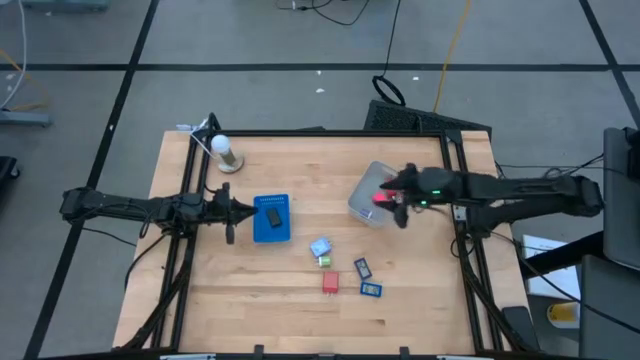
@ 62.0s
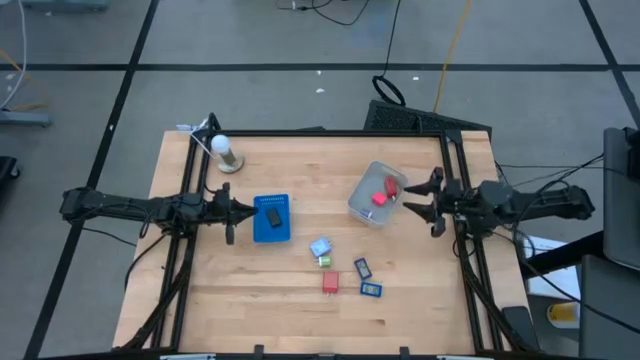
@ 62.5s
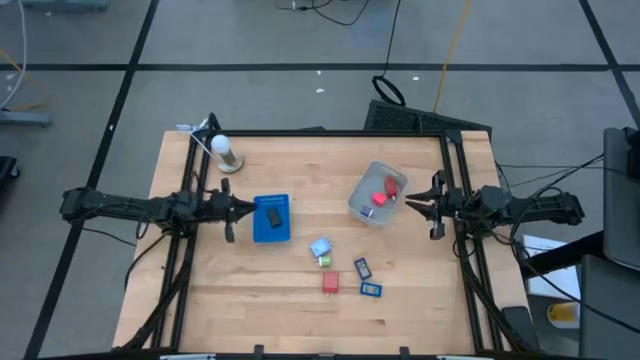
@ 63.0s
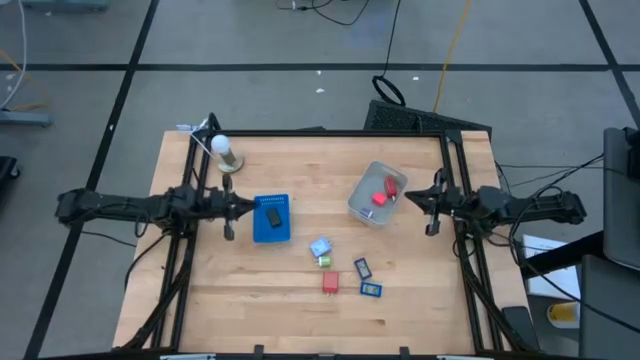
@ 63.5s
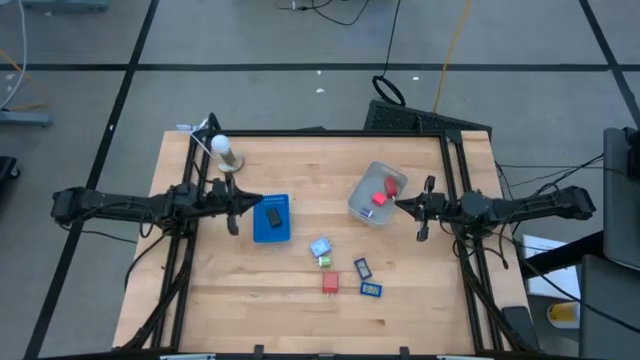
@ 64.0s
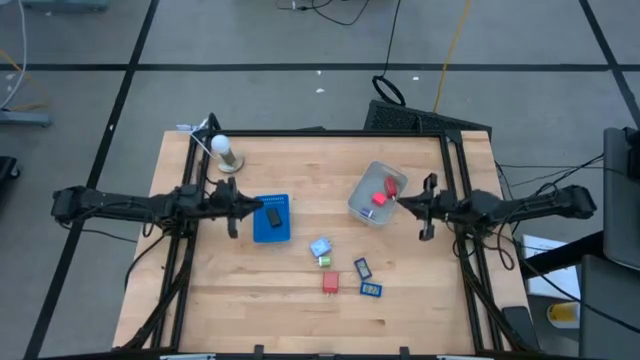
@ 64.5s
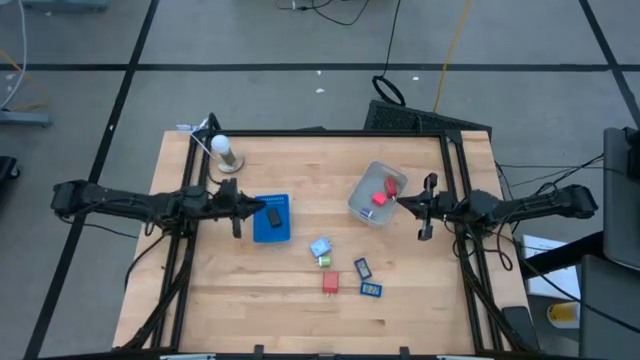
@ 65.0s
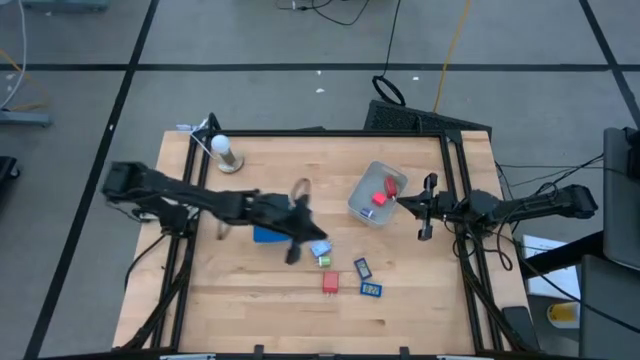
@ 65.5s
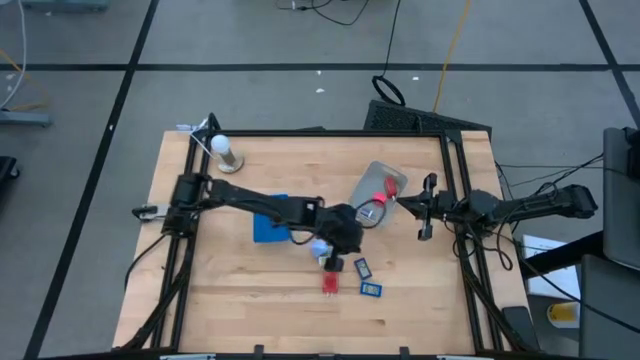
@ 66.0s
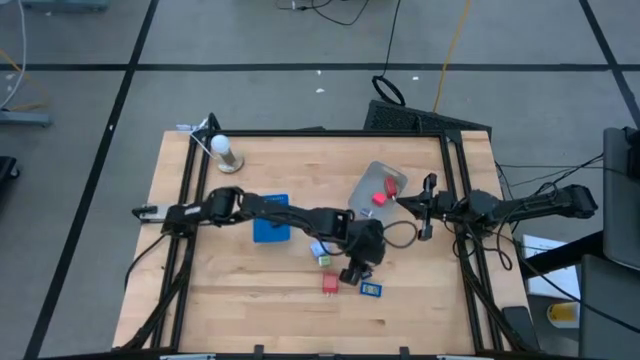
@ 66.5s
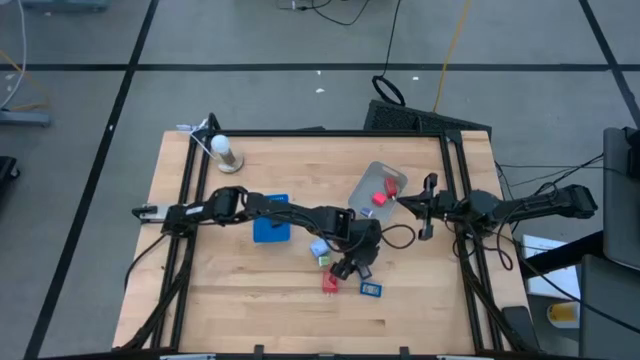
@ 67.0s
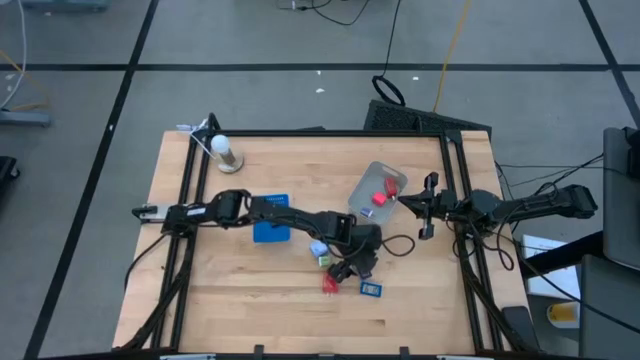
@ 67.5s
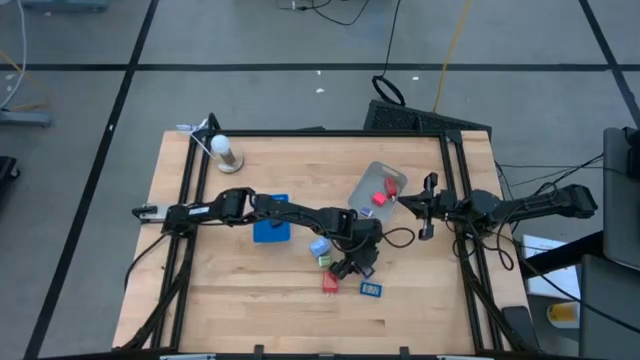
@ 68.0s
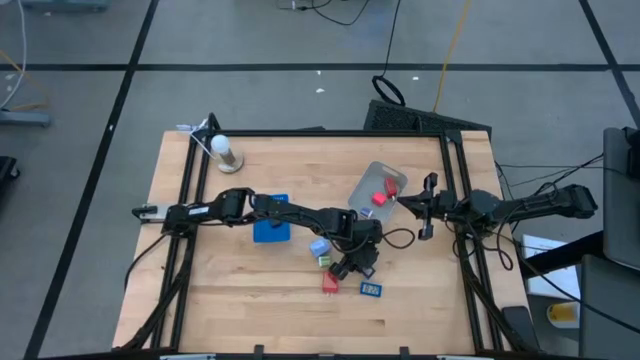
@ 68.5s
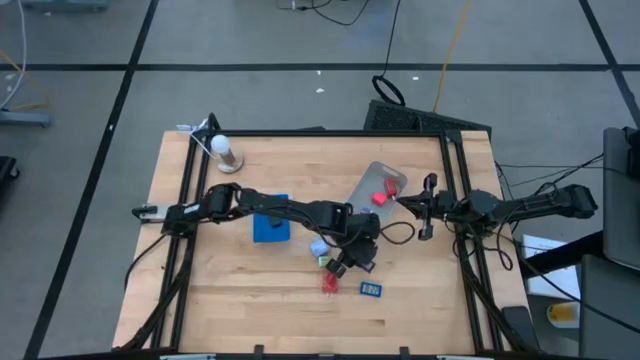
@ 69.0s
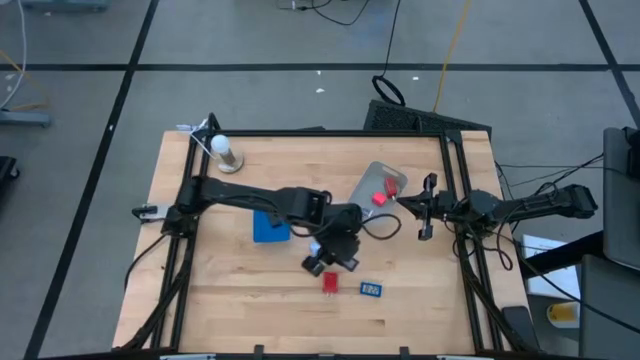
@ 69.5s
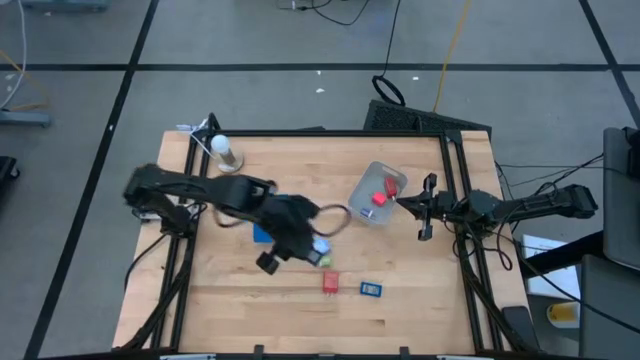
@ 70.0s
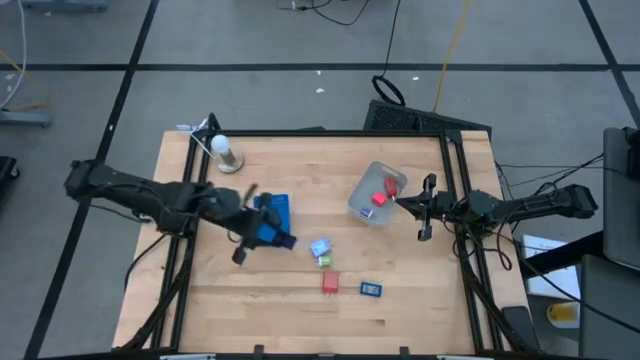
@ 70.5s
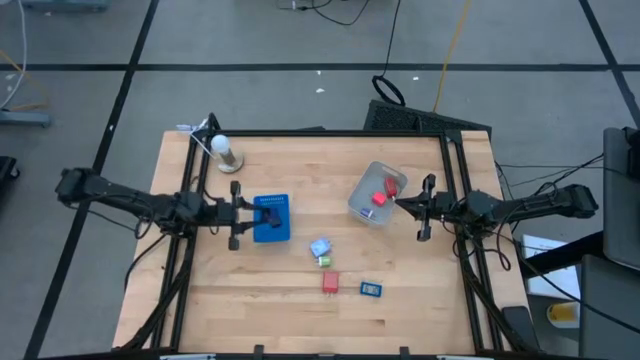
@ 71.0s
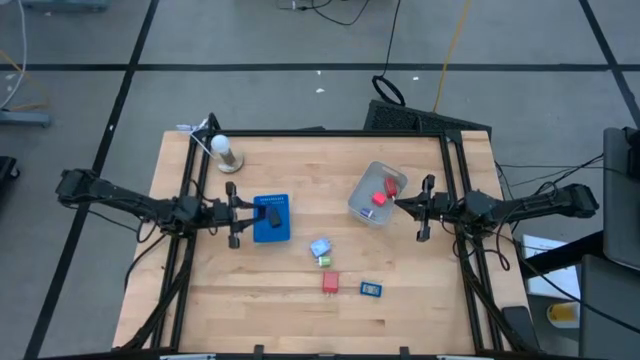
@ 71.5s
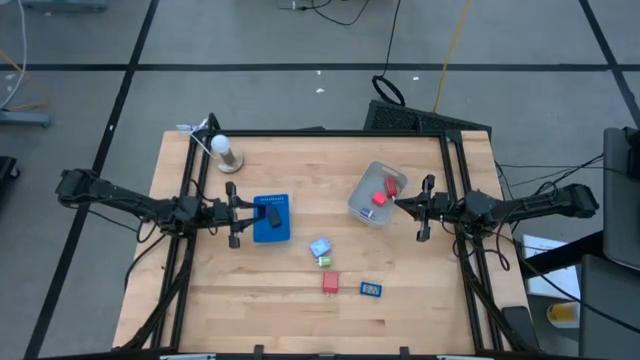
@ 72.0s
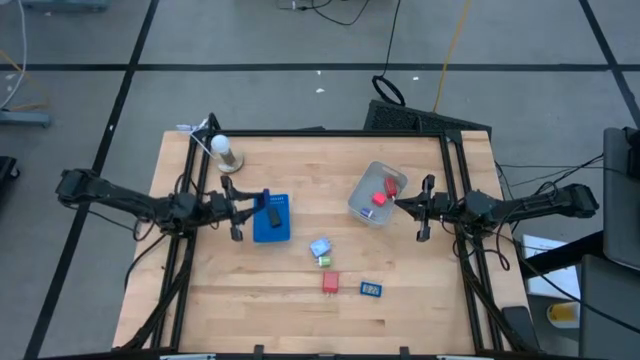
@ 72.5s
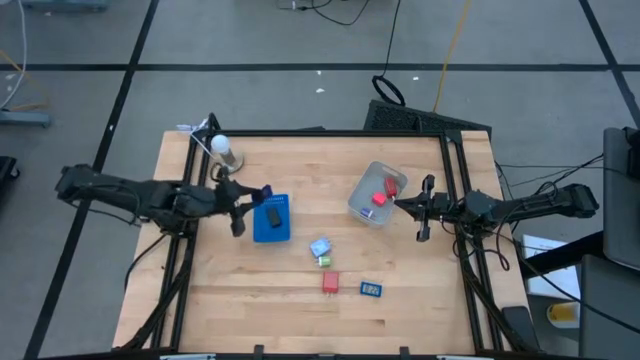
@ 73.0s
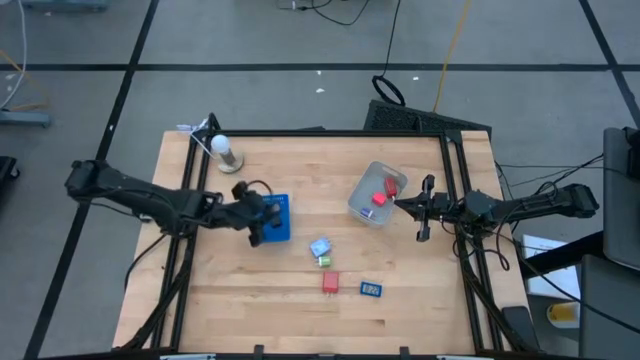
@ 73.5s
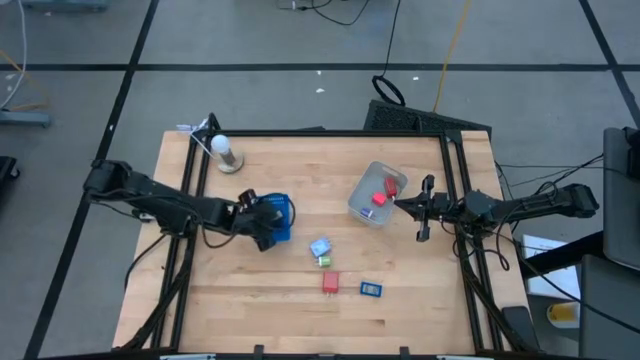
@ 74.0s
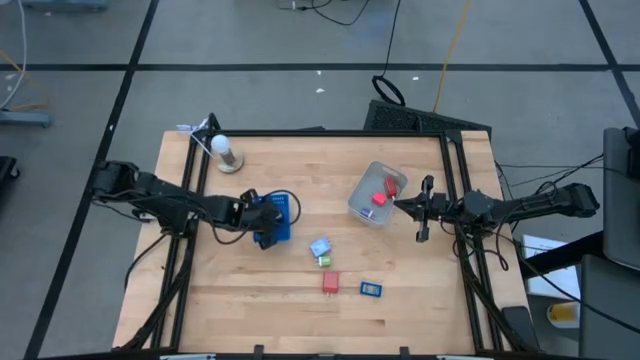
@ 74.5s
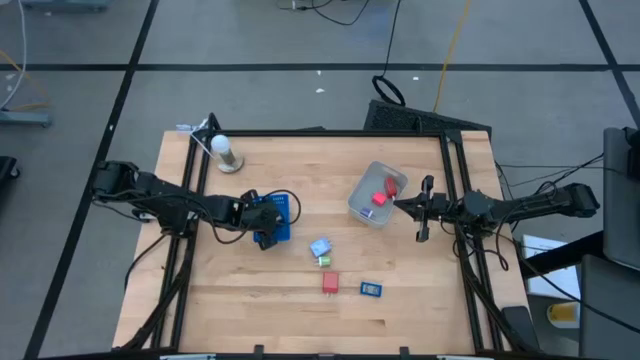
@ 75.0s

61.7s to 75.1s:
Task: Pick & Place Office items
Put the dark blue digital clock into the blue bin

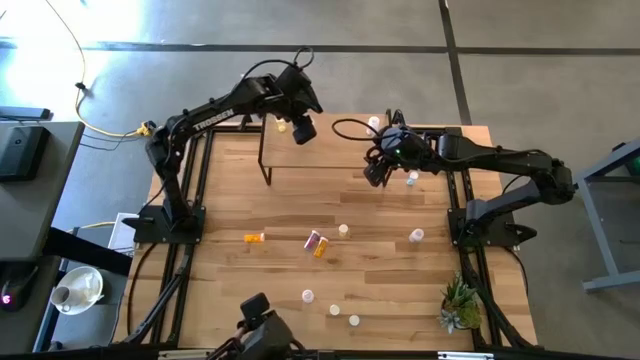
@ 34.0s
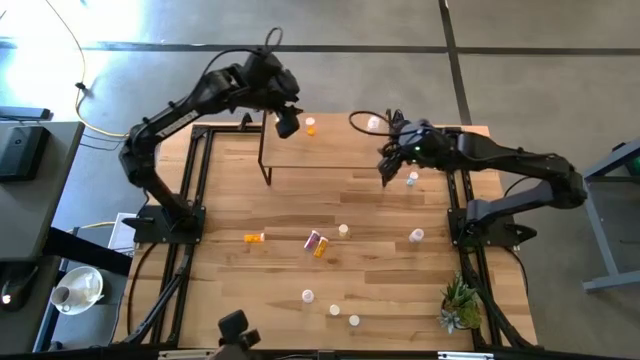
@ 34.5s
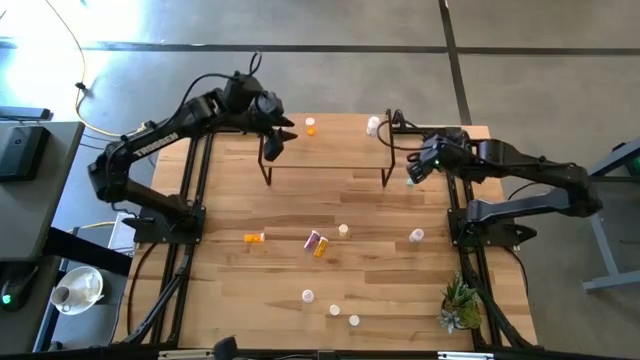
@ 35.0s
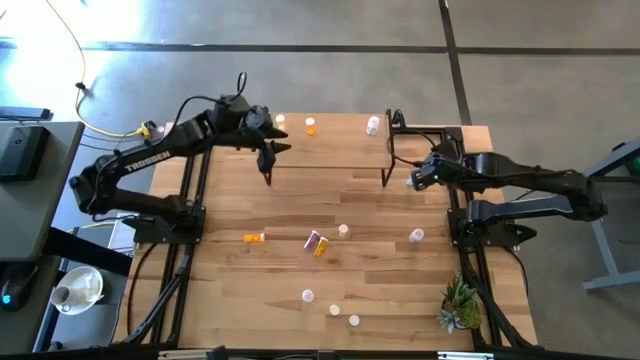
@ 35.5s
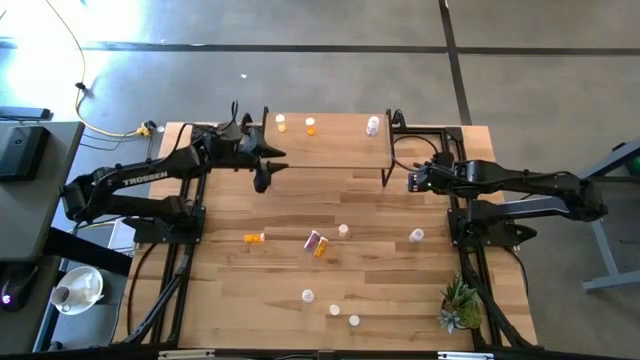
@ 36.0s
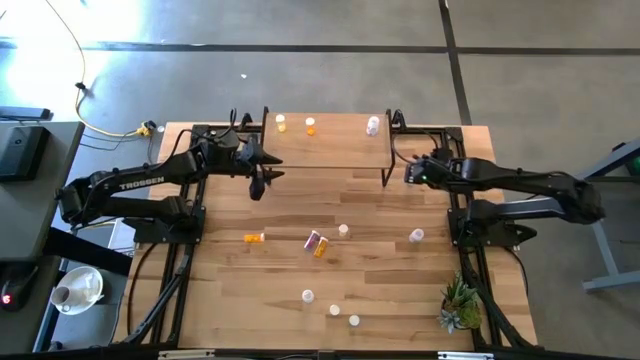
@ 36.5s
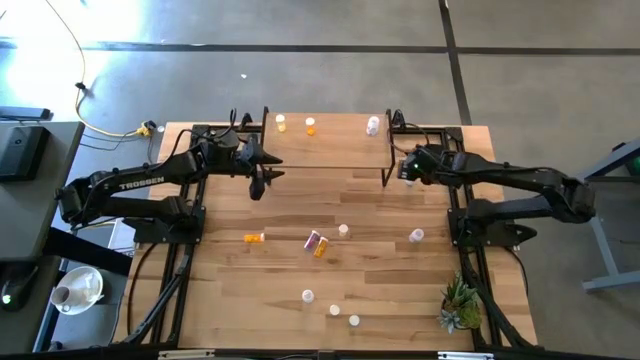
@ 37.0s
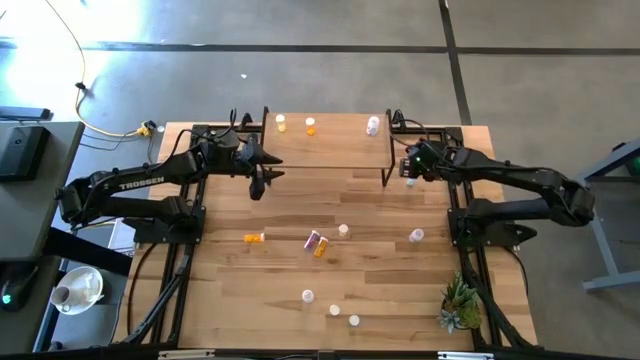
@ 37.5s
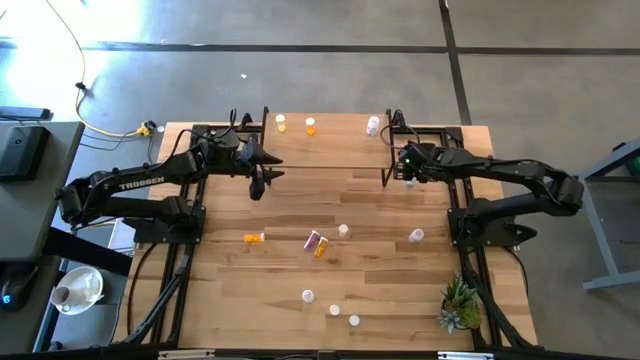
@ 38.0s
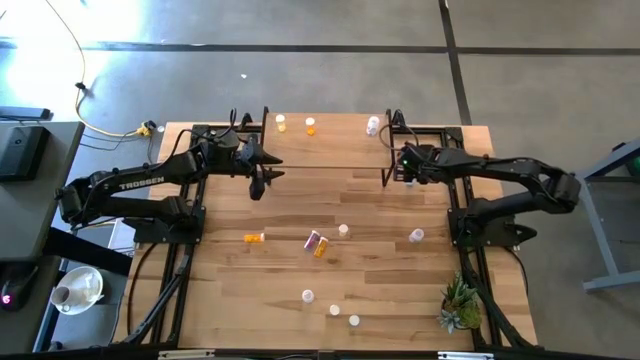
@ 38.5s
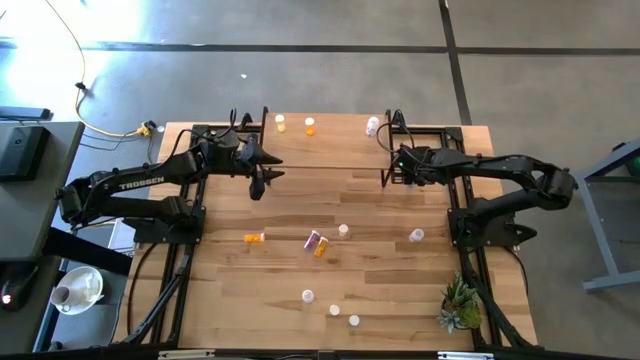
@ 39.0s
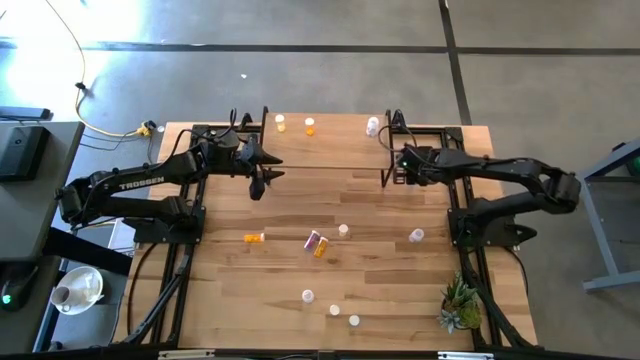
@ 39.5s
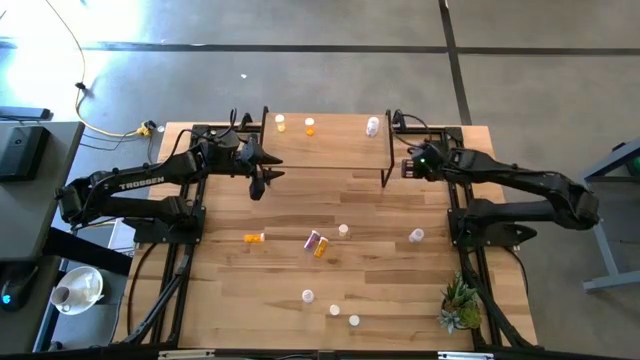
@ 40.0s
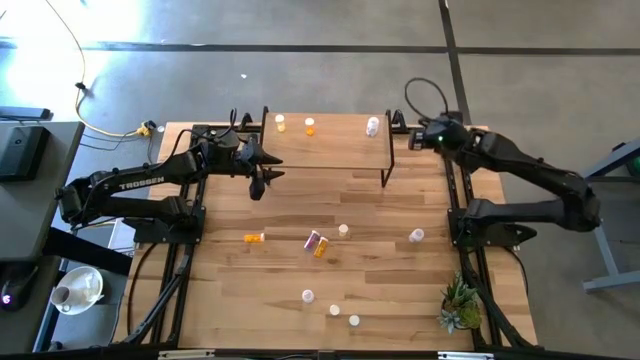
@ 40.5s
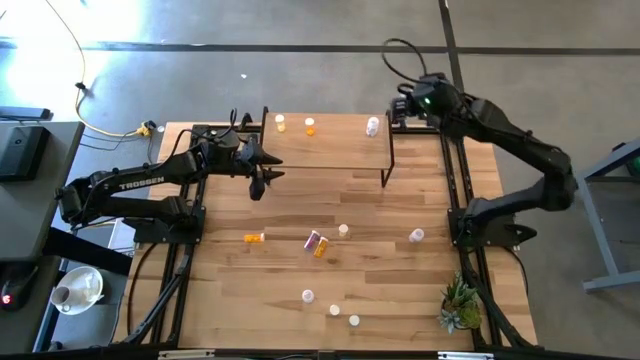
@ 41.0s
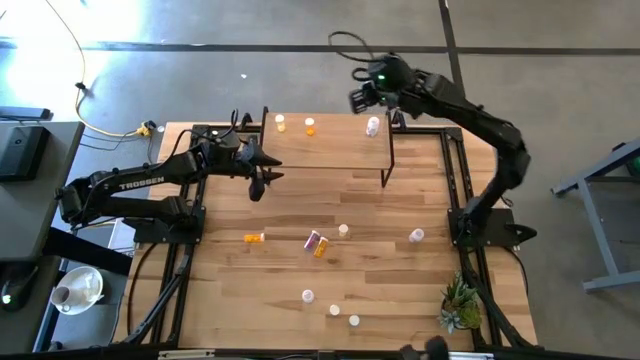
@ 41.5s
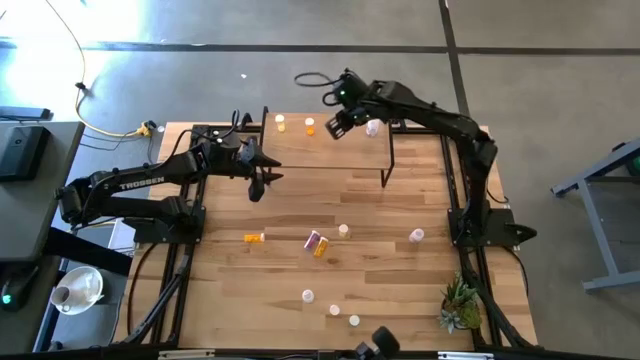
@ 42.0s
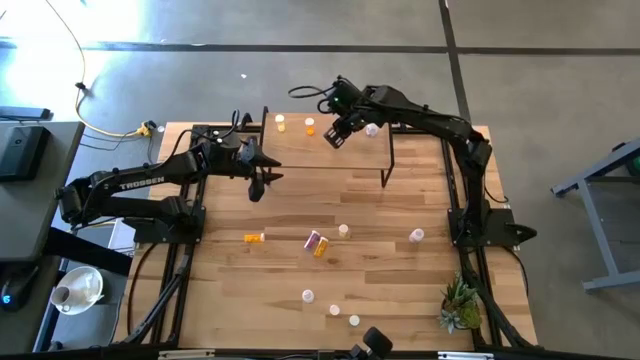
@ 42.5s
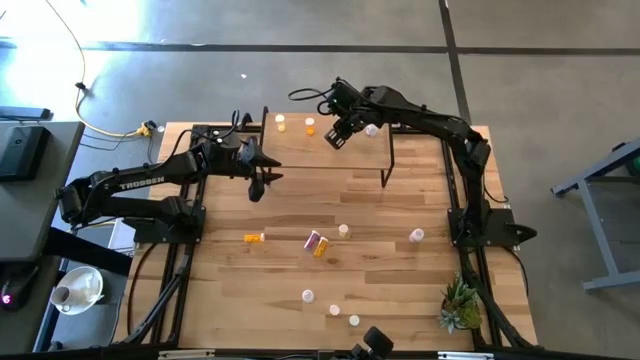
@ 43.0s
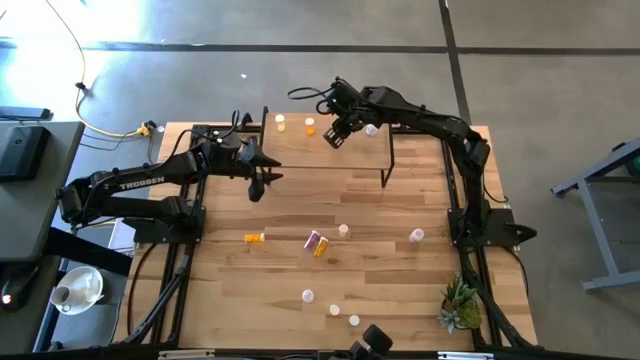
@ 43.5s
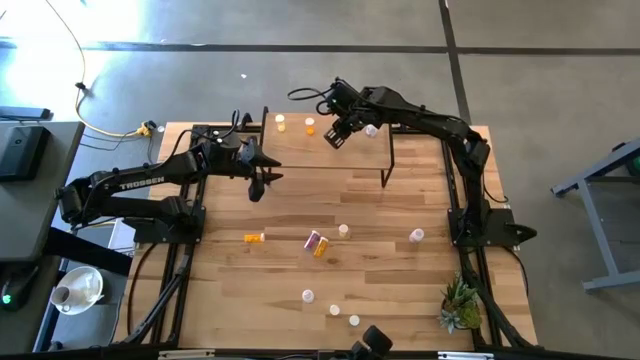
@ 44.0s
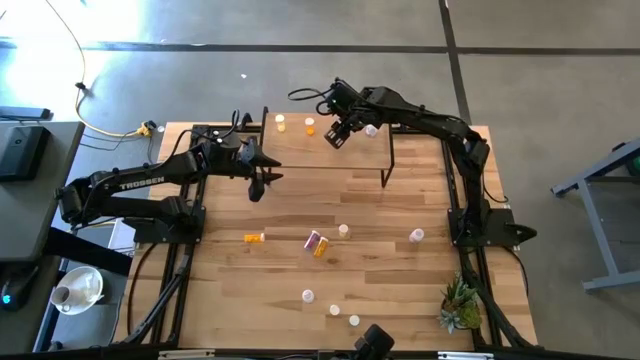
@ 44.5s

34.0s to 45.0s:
Task: Pick and place medicine bottles onto shelf by color
Put the top blue pill bottle on the shelf
